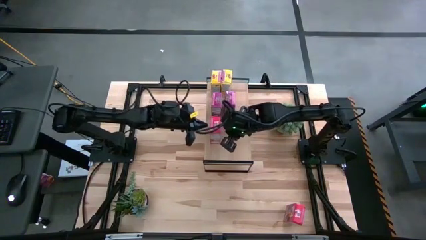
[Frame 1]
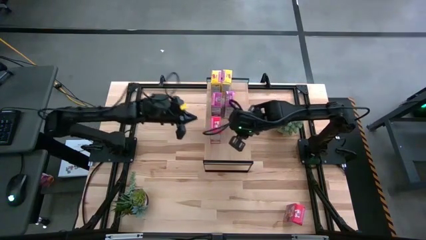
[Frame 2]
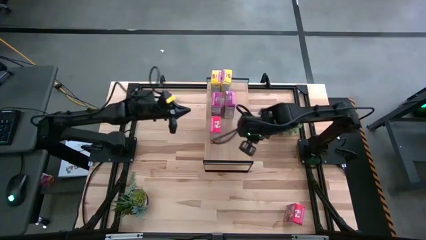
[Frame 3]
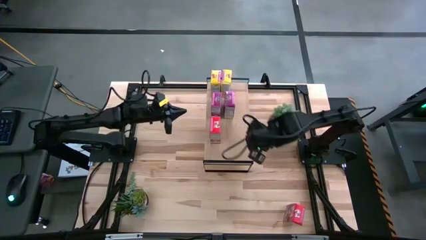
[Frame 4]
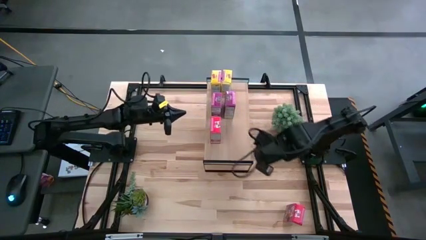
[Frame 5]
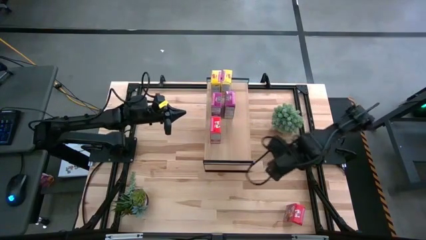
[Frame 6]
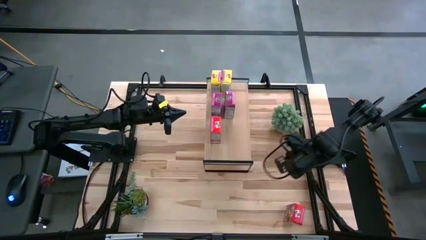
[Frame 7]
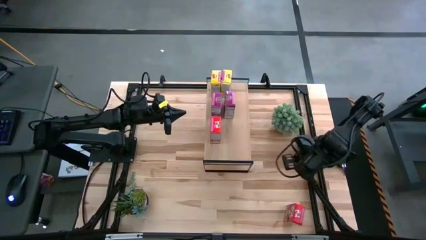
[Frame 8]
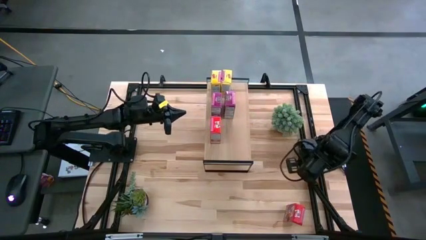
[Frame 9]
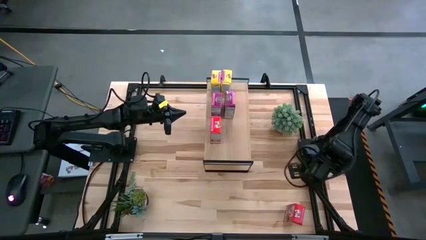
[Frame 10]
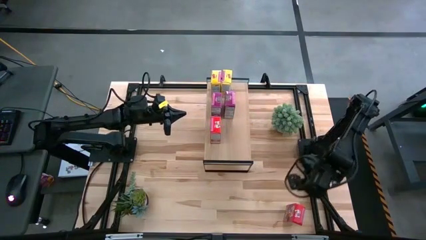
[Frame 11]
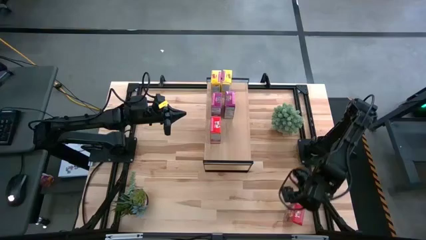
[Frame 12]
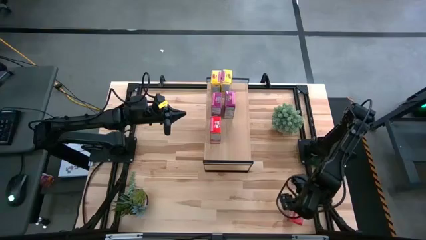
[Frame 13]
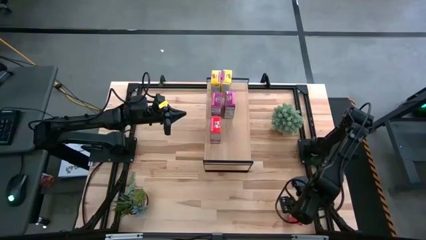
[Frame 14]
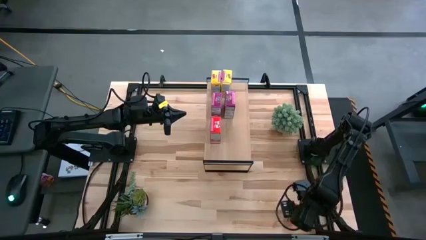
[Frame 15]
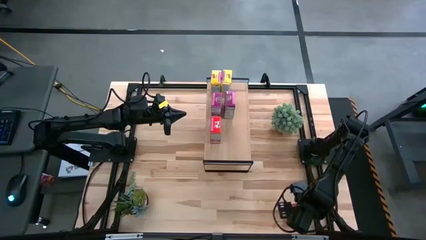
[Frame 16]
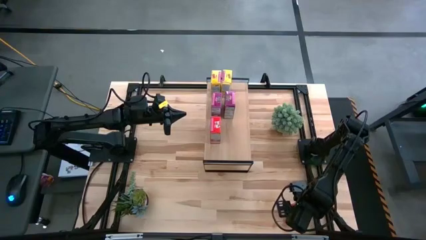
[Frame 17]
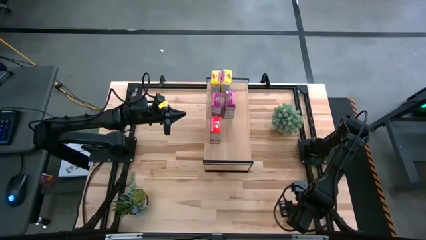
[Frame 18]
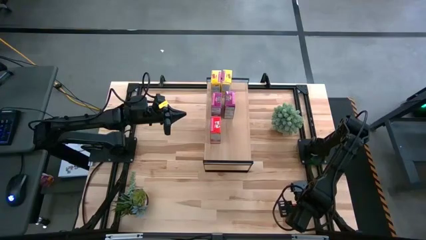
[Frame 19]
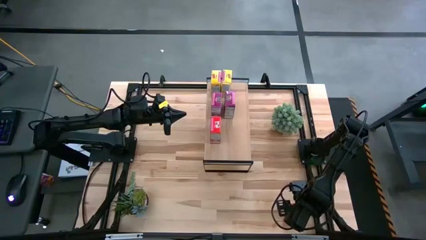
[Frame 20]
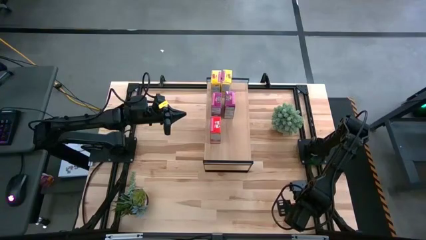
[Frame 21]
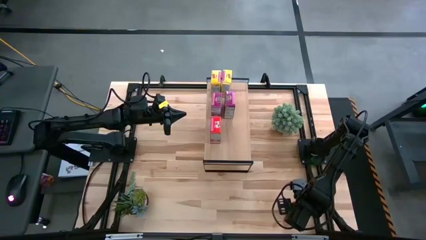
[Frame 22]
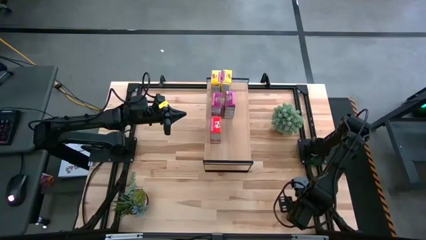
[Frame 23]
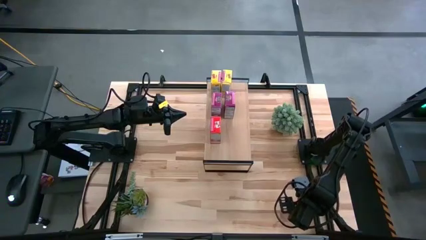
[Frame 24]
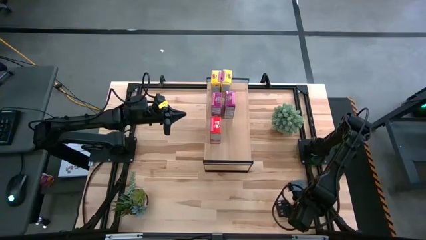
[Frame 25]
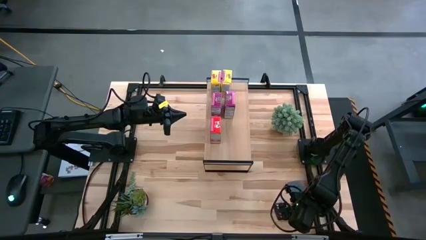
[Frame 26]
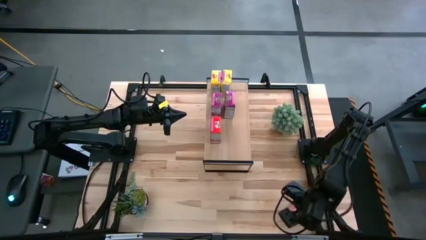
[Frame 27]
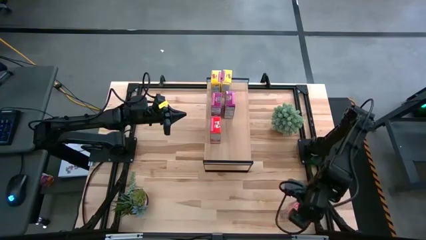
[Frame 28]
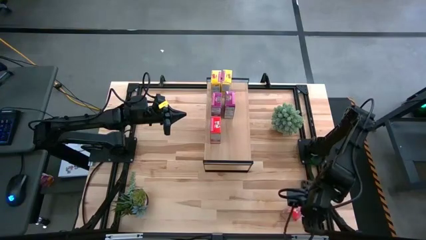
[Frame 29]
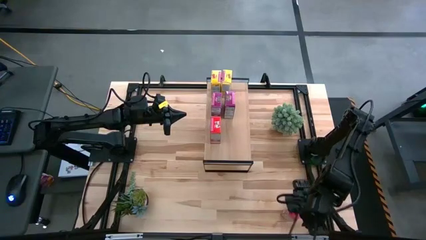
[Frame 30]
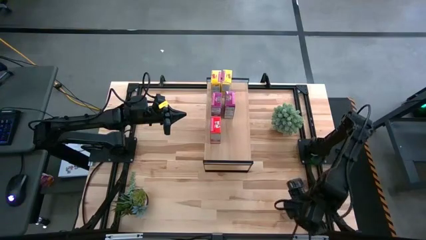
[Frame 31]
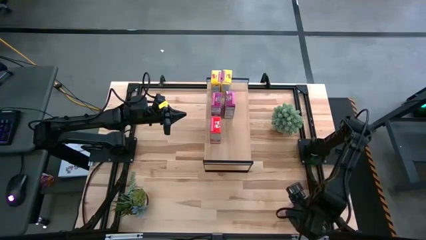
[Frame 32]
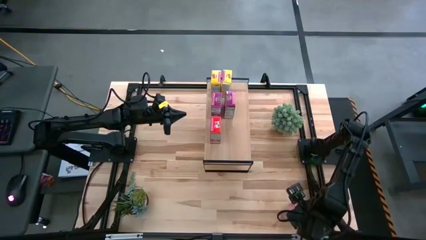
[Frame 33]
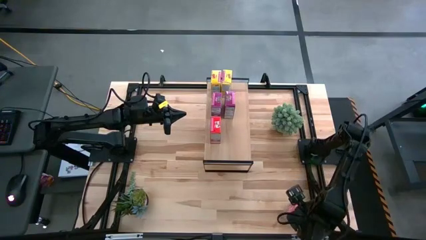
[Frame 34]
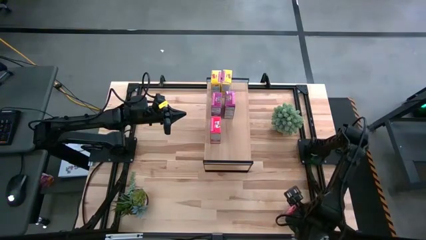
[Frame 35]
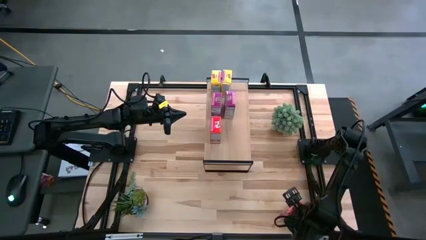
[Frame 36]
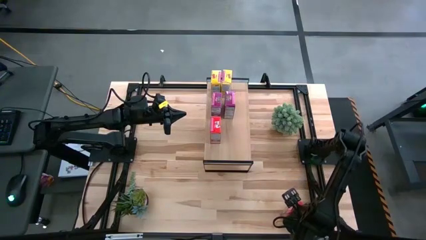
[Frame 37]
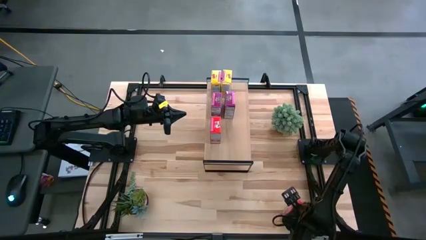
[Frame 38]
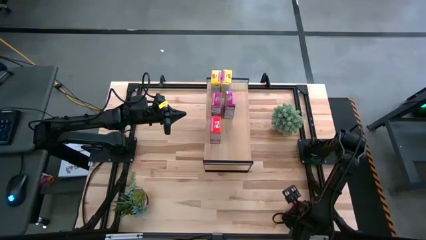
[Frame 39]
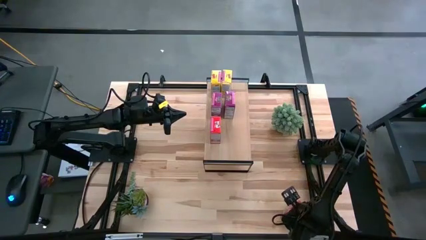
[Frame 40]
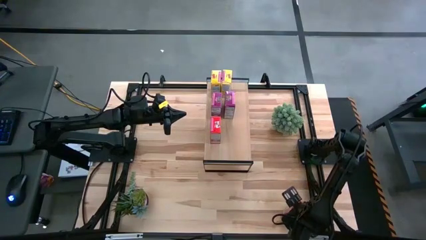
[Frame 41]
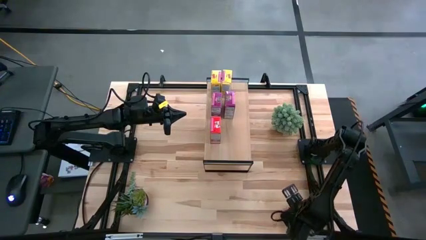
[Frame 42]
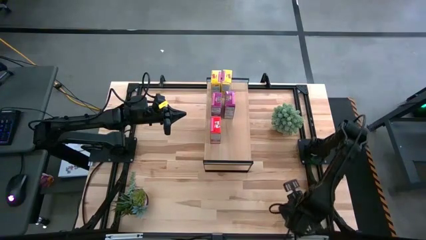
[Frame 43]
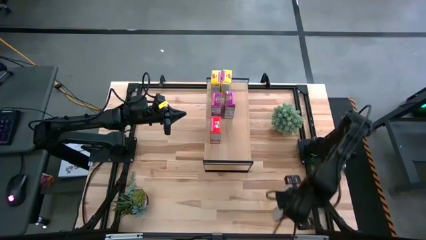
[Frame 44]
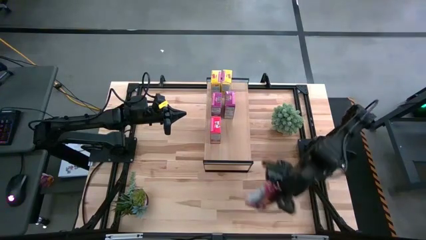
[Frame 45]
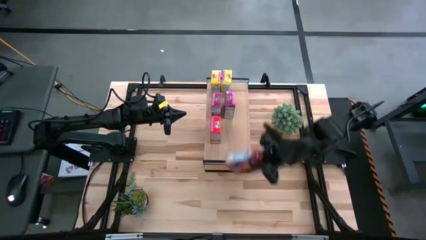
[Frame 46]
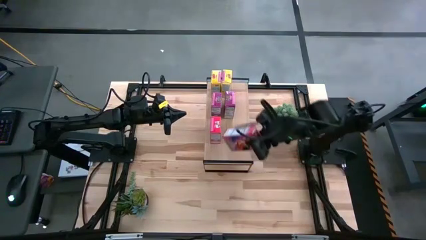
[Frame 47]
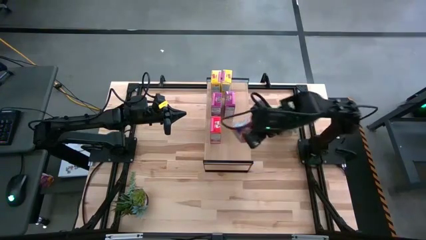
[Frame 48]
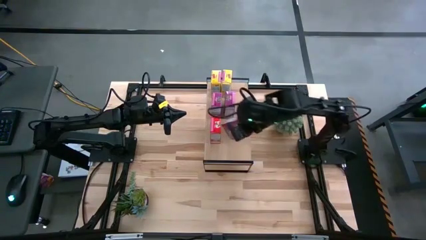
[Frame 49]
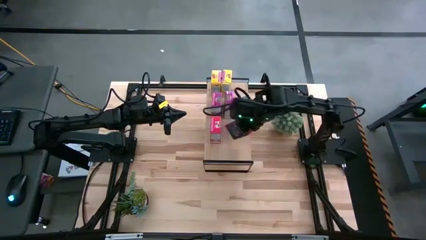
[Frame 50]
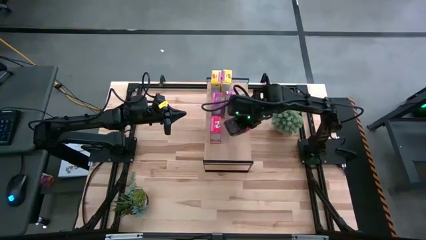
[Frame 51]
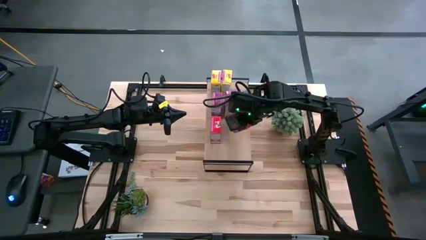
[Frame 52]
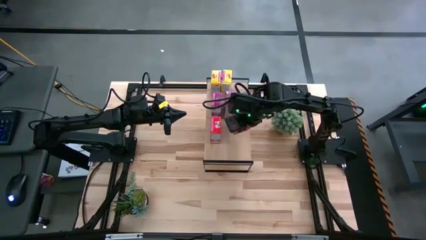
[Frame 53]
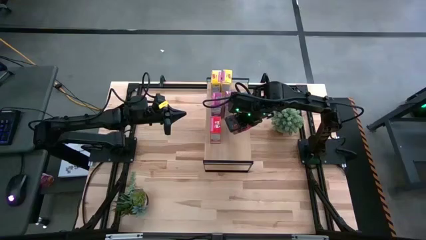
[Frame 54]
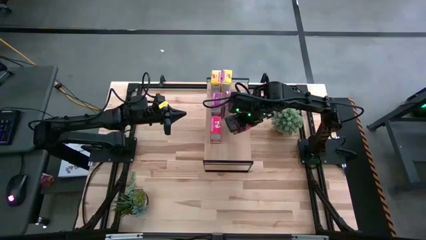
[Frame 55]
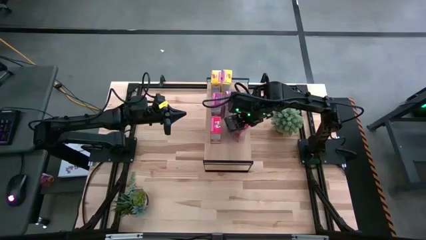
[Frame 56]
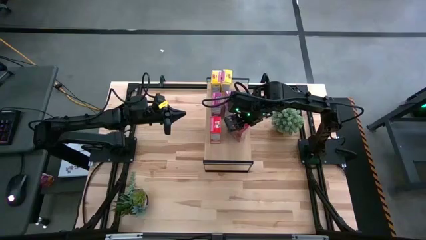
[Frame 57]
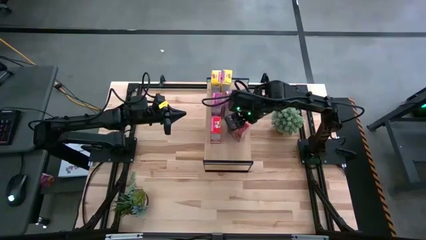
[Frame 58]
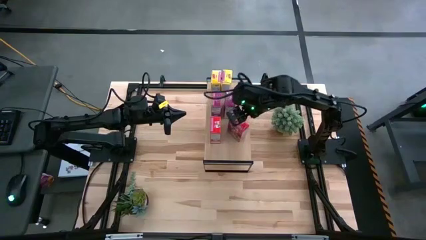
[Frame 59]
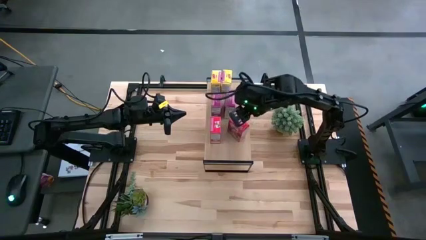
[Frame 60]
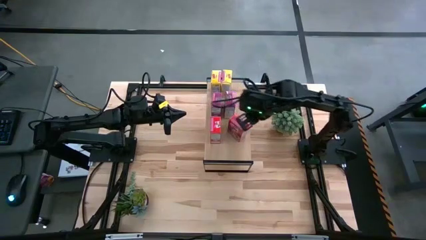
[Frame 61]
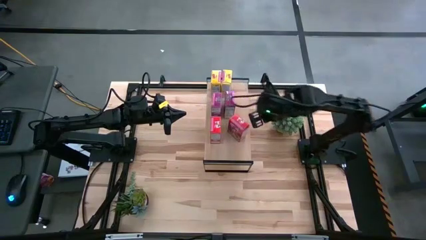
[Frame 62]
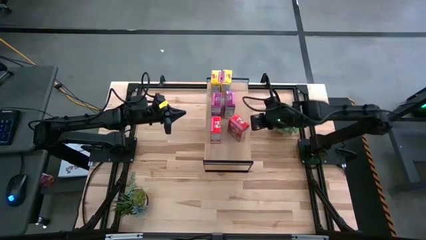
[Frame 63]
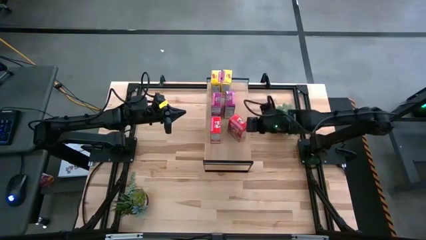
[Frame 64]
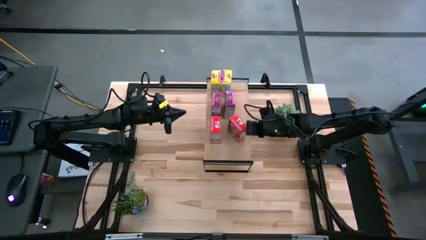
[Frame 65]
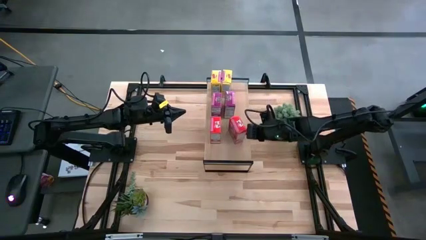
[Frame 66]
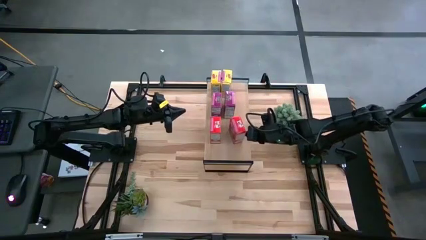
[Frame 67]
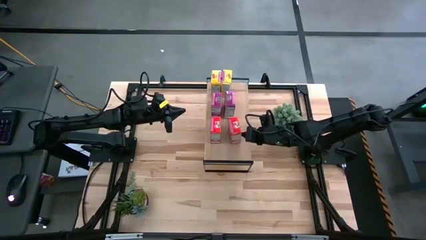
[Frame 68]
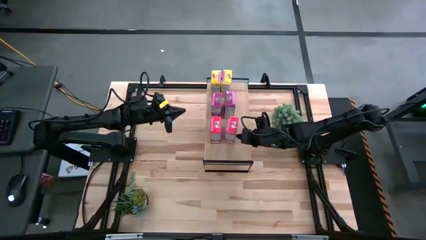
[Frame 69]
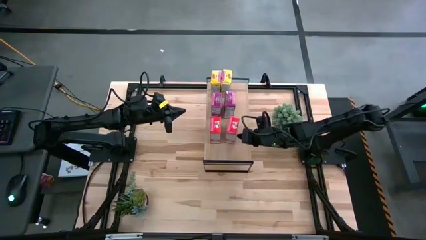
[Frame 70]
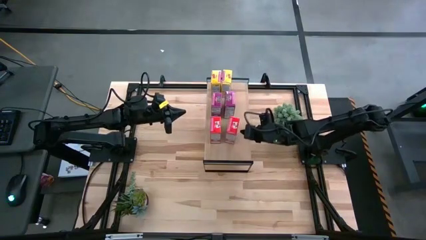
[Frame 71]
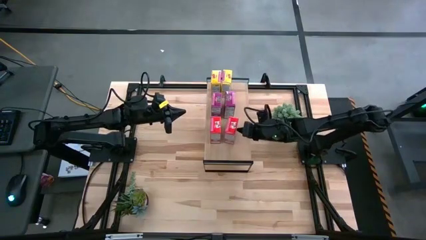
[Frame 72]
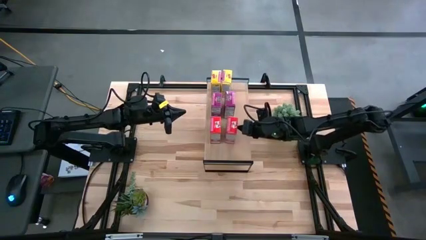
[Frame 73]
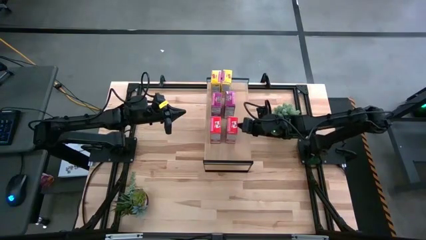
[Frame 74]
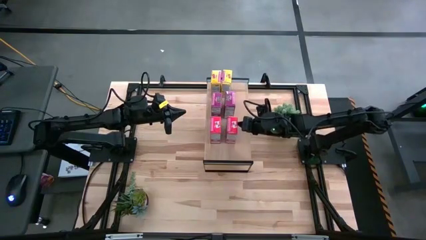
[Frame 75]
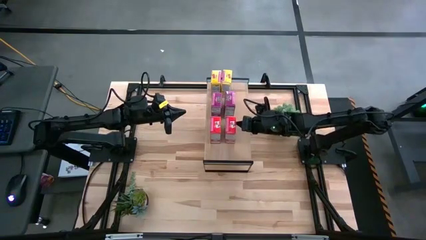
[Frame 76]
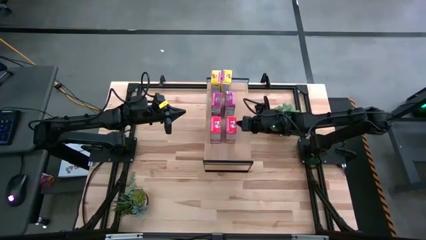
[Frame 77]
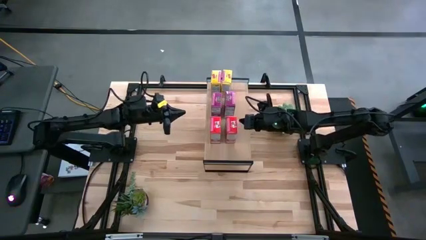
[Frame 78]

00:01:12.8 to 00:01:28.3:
Task: Stack cereal on shelf
Align the red cereal box with the other red cereal box on the shelf

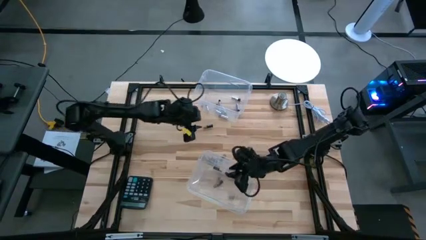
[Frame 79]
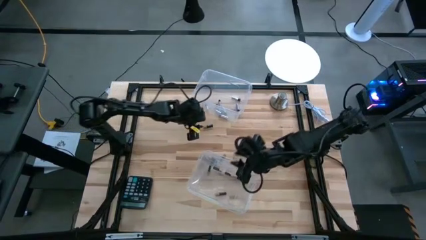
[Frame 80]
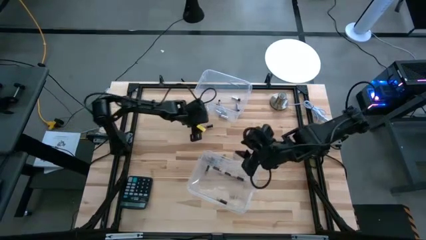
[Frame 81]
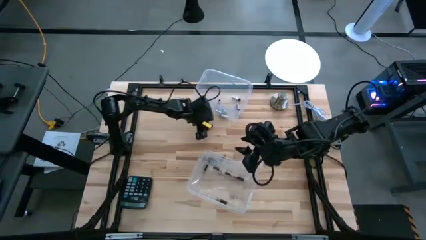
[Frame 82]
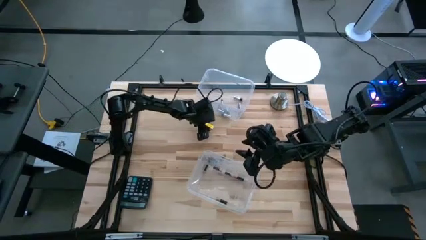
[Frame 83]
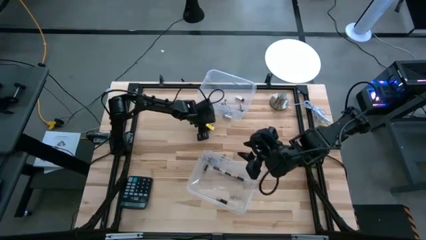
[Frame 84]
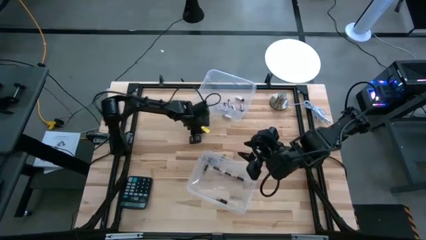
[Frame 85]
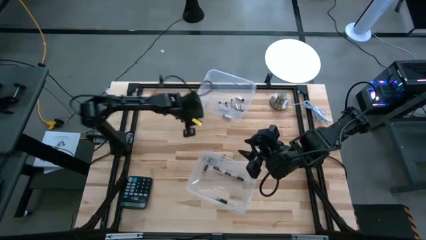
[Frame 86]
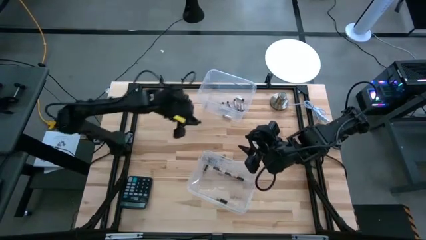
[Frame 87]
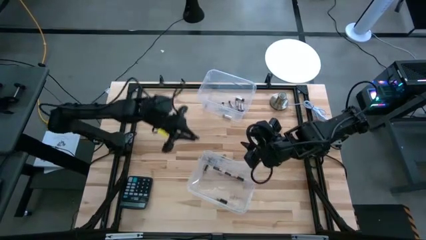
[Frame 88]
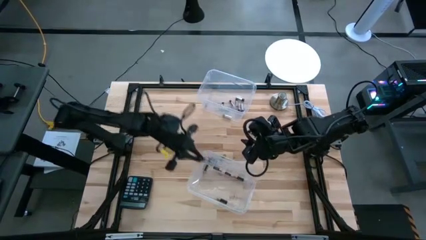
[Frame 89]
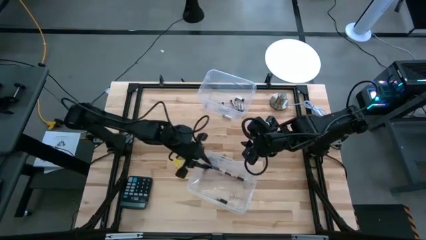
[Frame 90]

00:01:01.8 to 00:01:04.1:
Task: Sort batteries
Put the black battery into the bottom transparent bin
